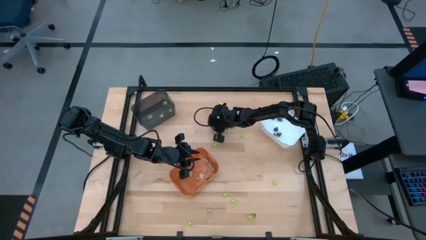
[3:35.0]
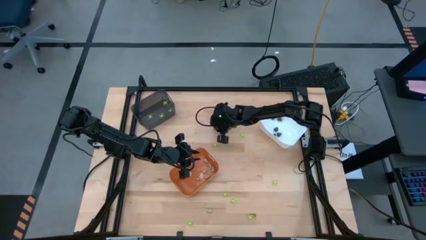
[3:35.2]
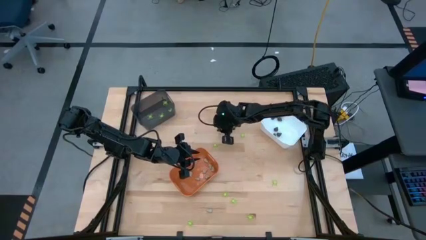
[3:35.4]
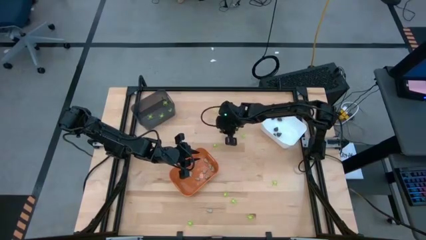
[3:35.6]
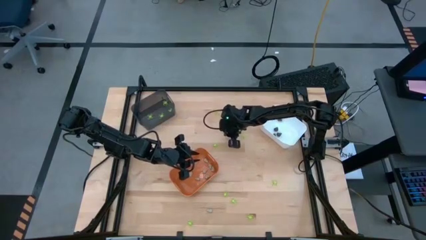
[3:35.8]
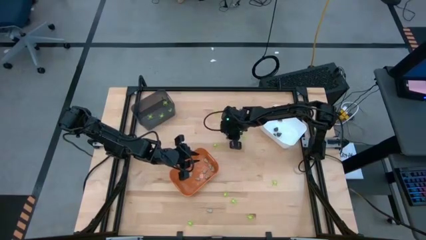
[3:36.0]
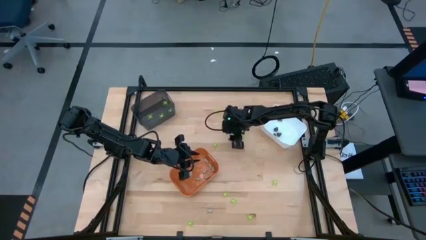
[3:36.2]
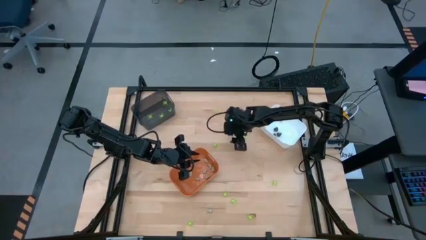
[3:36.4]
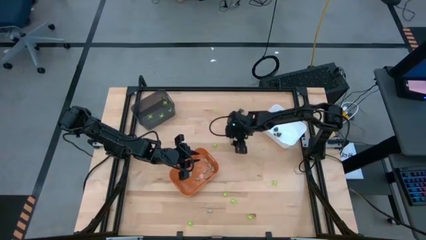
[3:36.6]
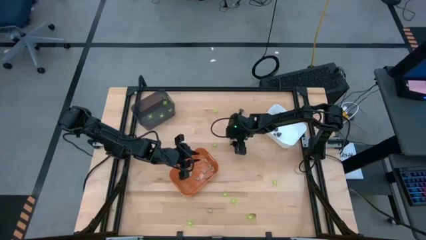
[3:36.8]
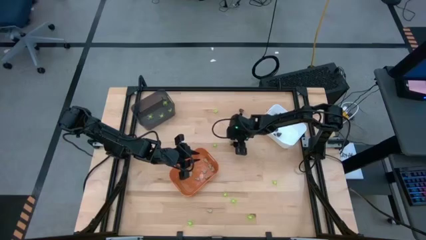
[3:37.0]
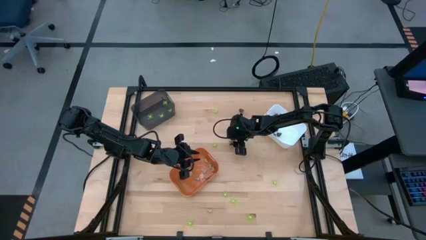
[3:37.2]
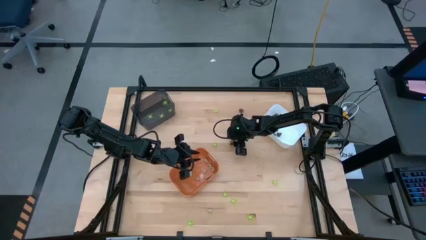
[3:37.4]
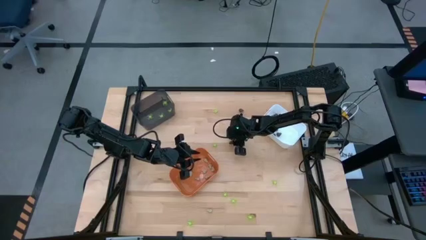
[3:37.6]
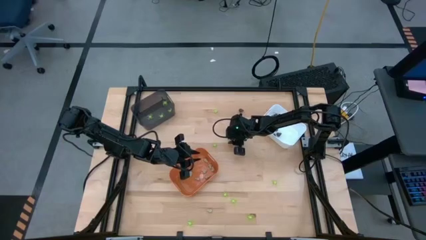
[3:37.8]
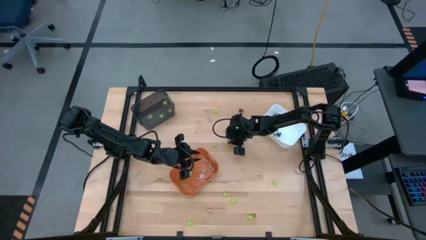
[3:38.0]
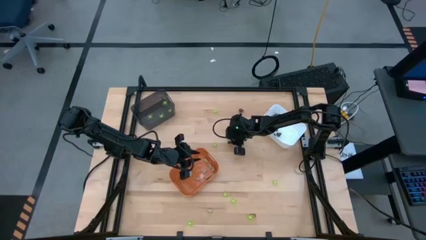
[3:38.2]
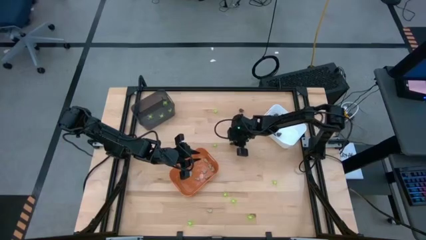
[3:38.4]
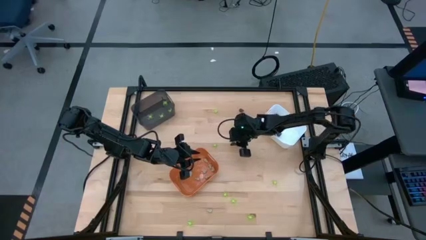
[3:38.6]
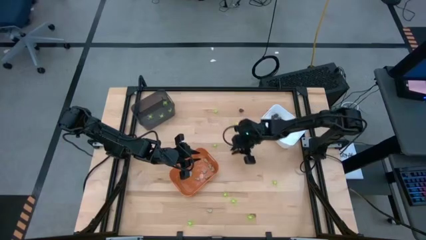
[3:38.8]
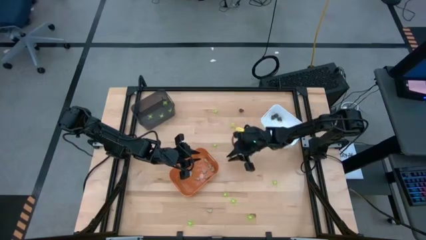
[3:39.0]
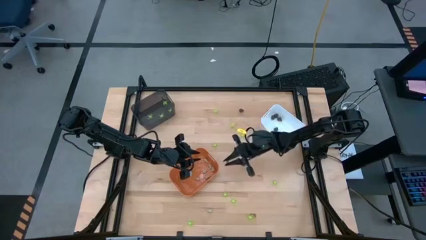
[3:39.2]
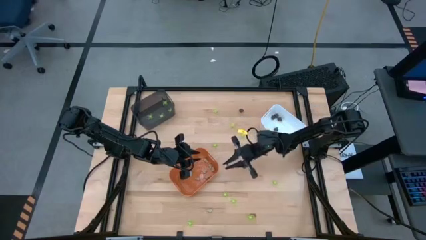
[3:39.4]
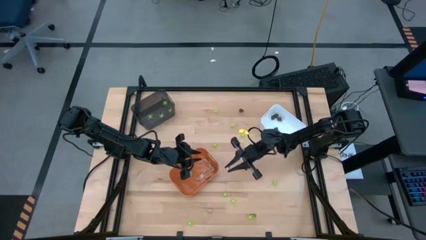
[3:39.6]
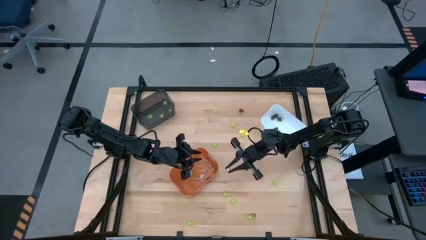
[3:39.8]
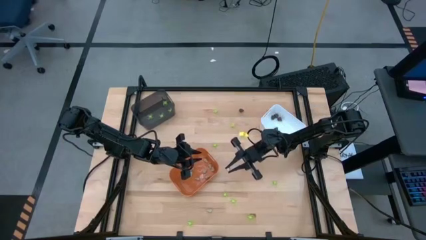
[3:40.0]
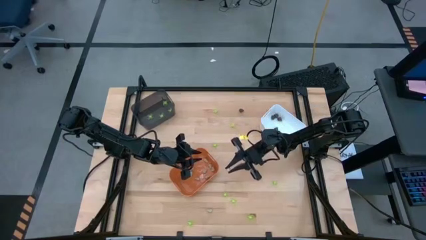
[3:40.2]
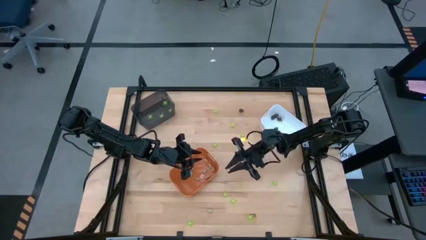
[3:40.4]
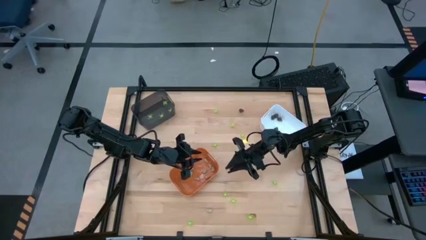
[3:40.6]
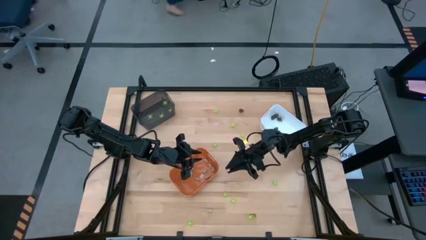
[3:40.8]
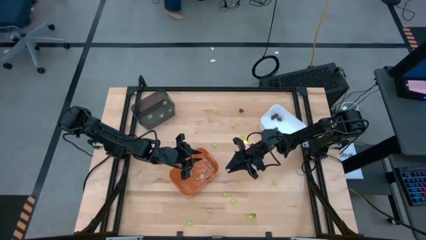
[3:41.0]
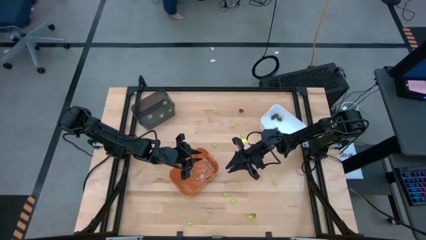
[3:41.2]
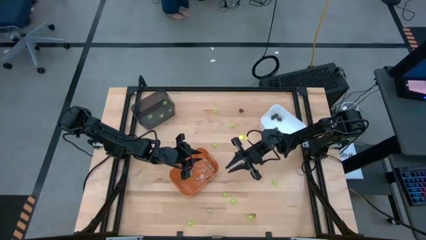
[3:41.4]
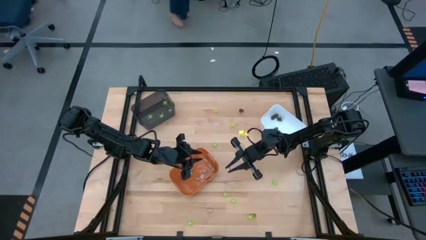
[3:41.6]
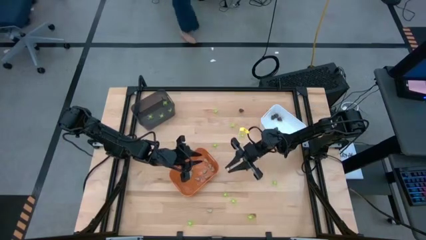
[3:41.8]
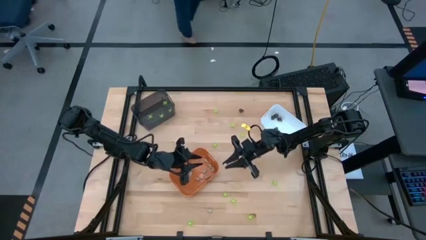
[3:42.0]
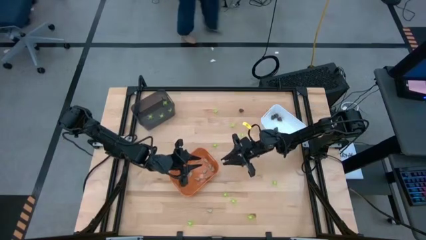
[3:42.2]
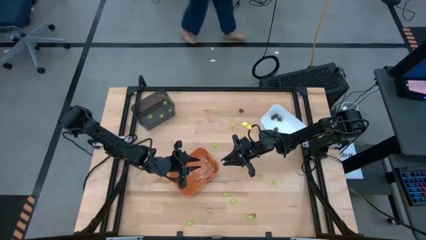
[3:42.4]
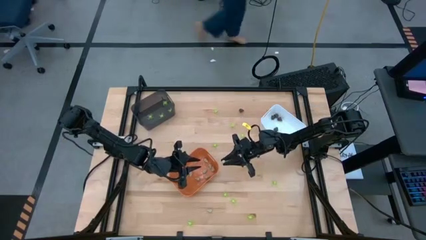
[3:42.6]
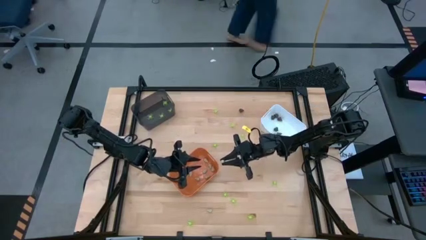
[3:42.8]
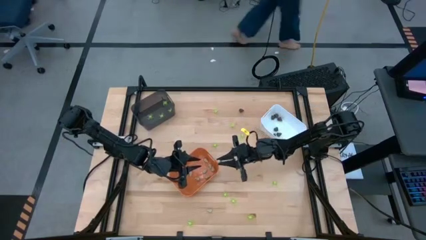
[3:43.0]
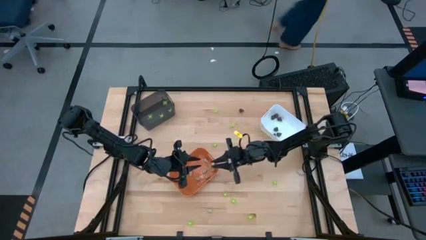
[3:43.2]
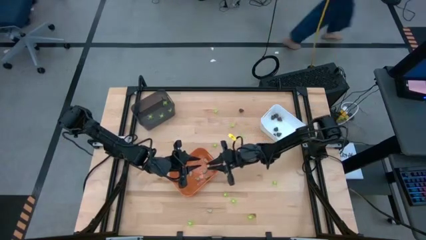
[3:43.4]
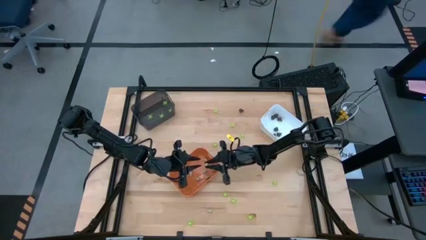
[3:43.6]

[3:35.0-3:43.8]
Task: Sort Halloween decoration
Put the small white skull toy into the orange bin

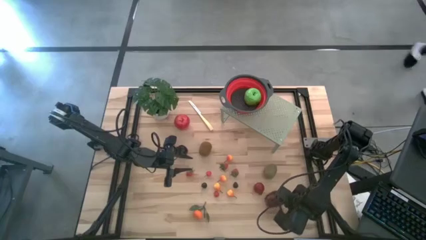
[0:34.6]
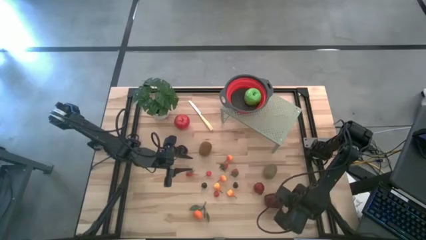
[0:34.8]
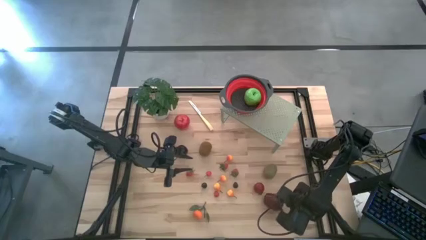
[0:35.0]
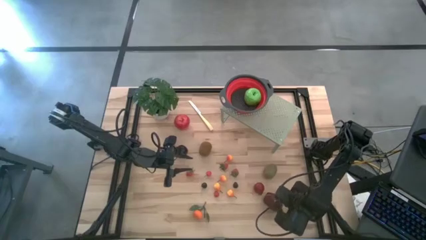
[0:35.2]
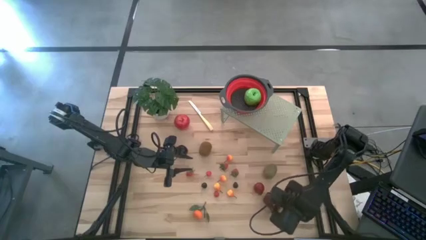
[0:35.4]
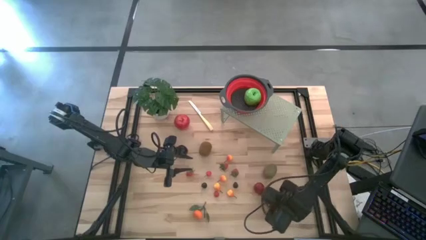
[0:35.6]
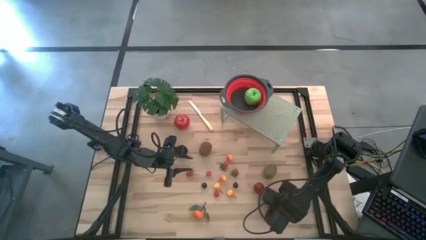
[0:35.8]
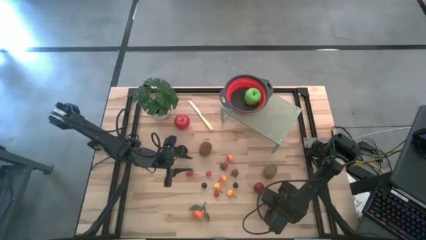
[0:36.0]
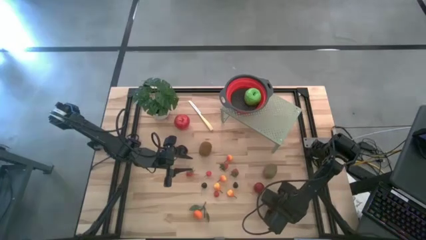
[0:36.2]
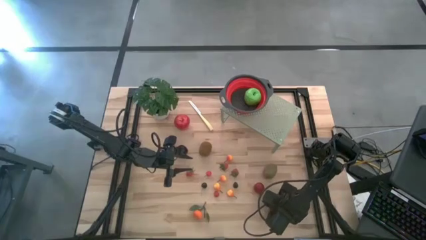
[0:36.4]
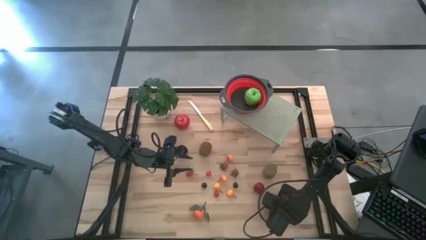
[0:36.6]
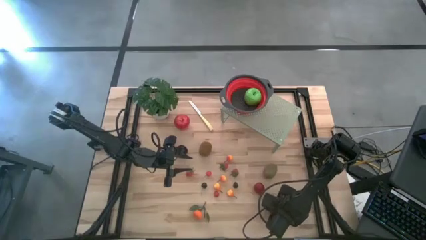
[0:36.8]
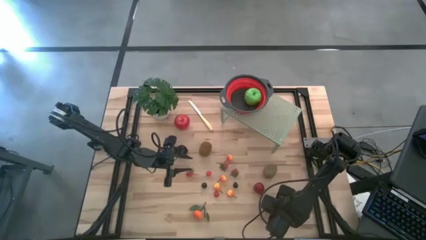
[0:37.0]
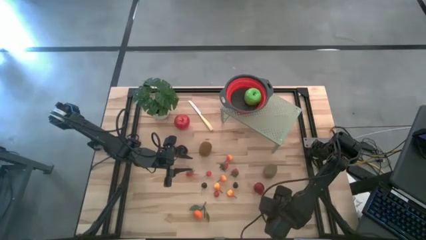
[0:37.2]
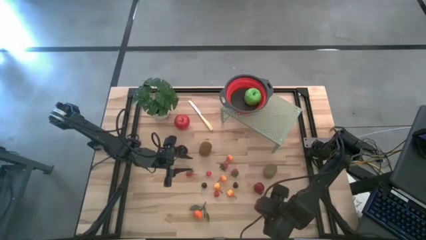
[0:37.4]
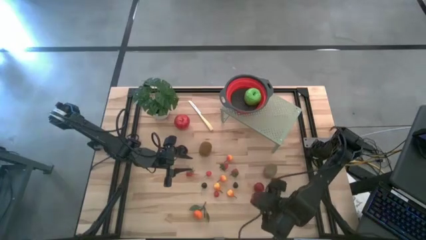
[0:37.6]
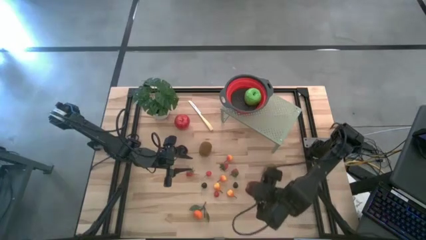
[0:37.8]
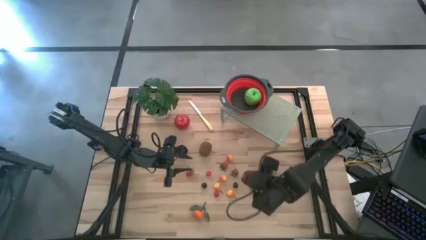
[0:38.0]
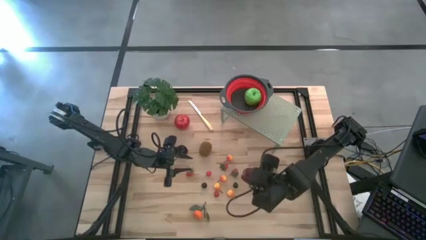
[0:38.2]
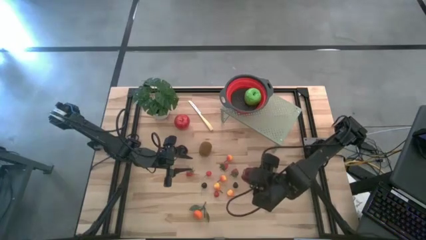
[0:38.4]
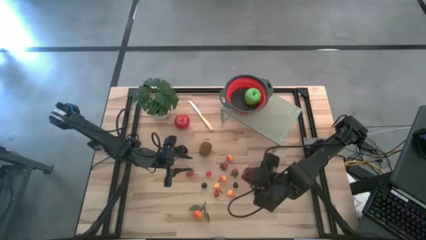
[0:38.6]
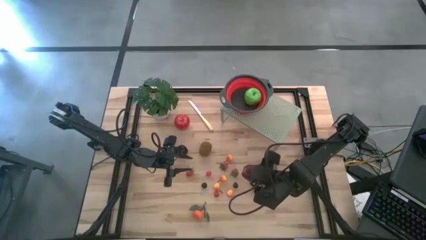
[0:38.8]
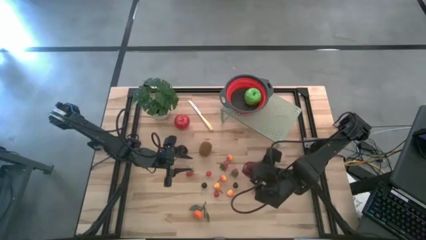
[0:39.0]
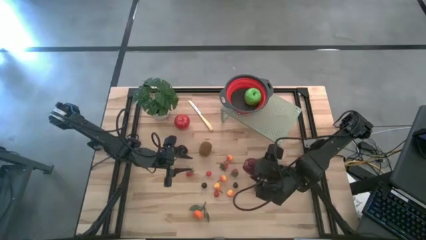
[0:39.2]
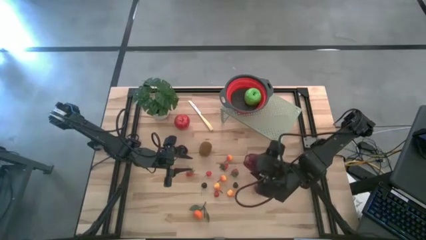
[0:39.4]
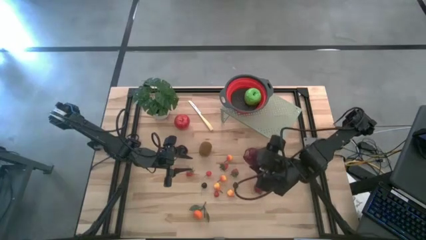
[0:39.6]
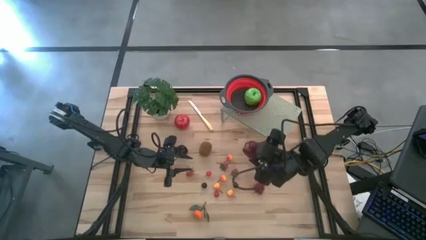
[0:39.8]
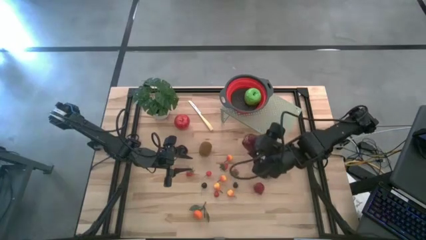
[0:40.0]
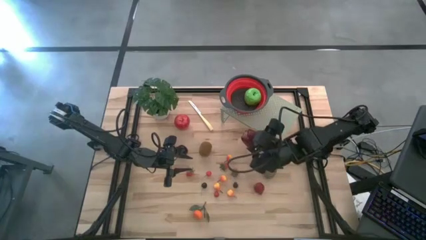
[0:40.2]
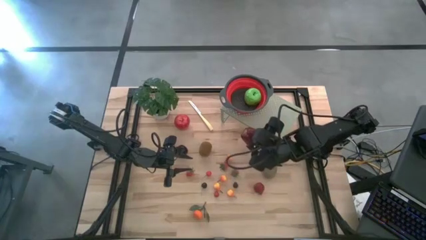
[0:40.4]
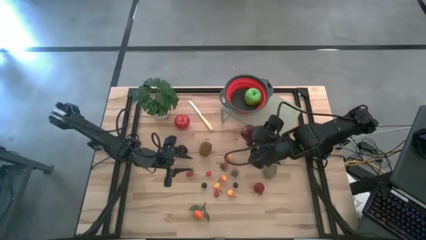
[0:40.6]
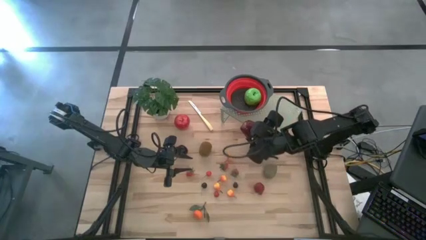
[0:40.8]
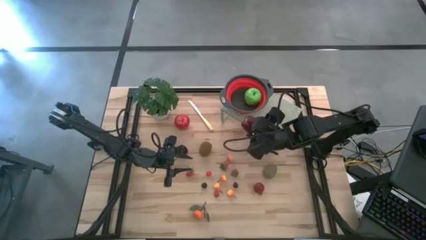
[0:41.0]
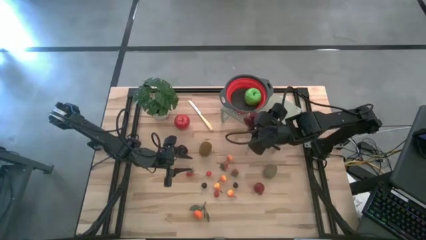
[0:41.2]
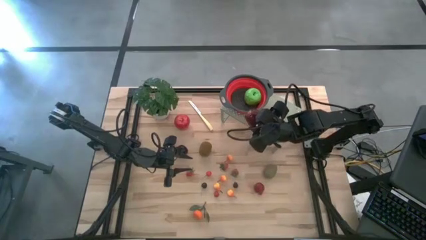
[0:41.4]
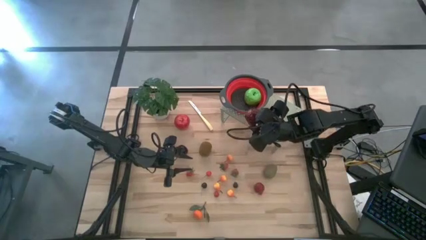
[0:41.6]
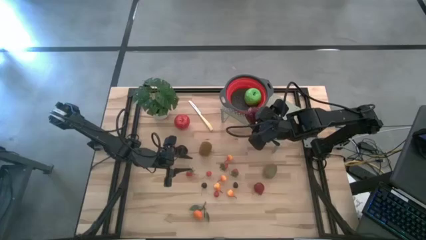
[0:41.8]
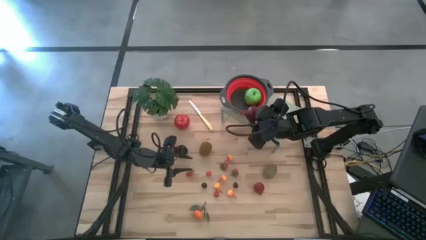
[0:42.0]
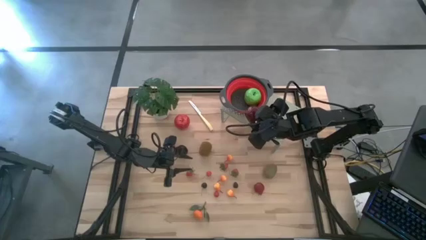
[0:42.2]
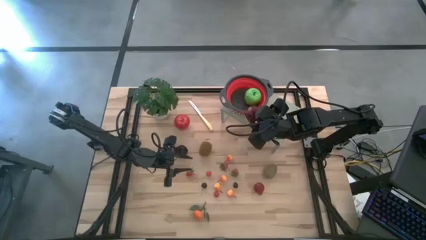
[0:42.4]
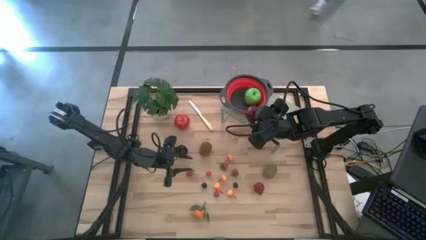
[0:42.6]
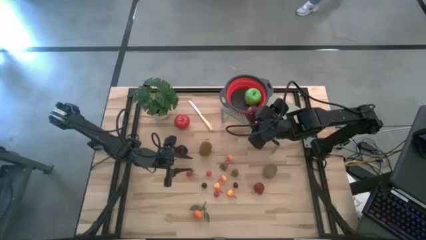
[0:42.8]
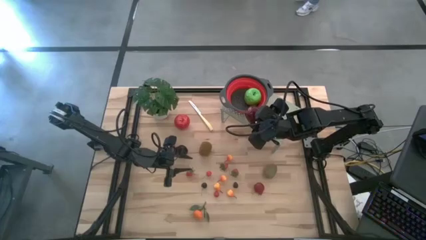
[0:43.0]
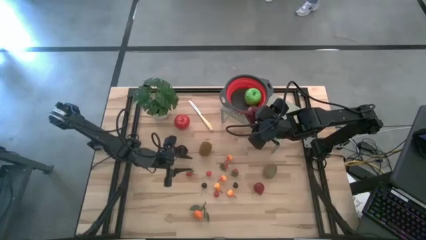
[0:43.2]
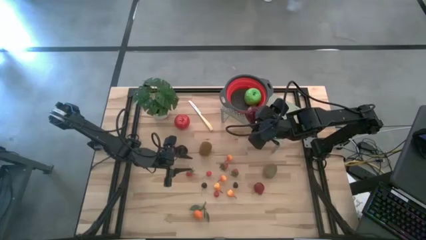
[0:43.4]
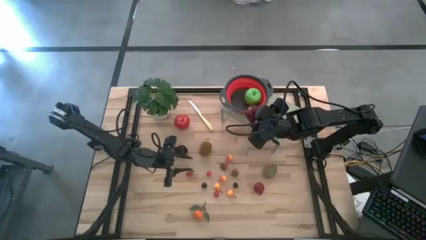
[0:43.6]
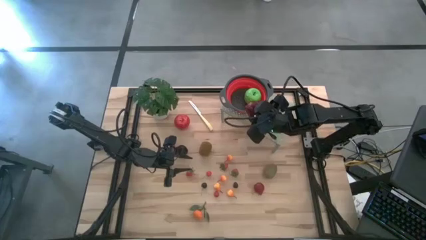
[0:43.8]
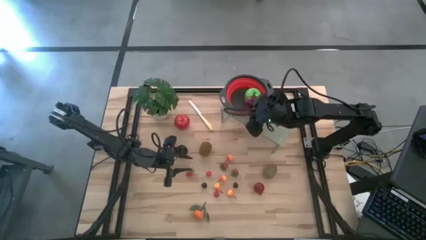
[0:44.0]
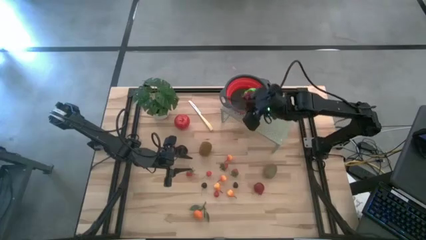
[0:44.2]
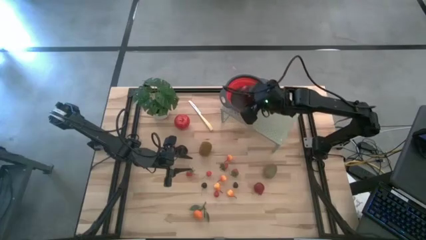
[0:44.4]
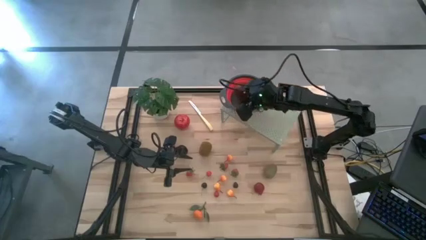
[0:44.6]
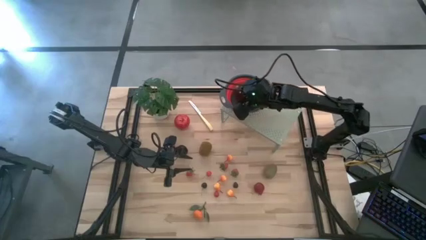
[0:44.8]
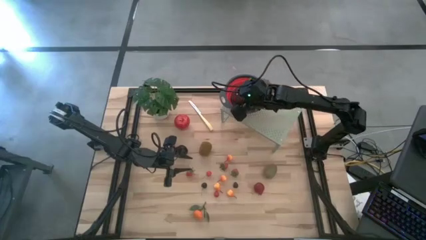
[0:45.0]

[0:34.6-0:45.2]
Task: Pick & Place Fruit
Put the dark red apple into the red gray colander on the shelf
